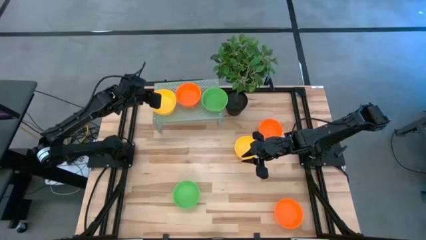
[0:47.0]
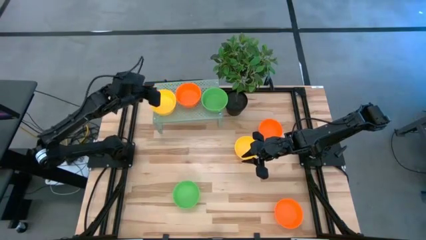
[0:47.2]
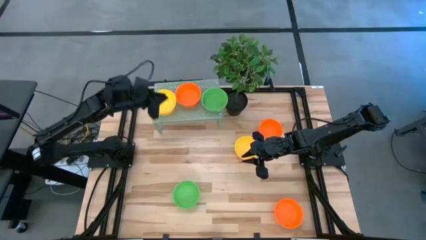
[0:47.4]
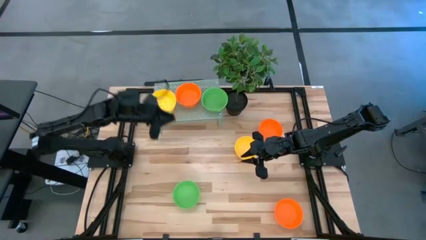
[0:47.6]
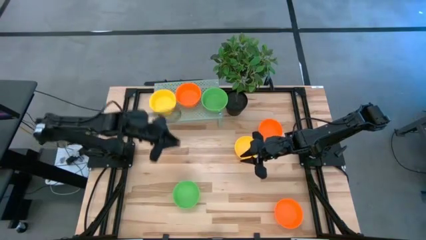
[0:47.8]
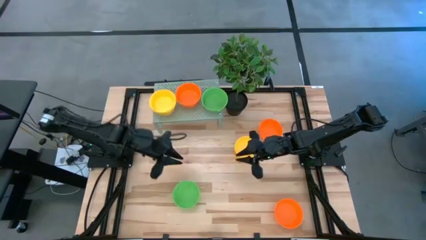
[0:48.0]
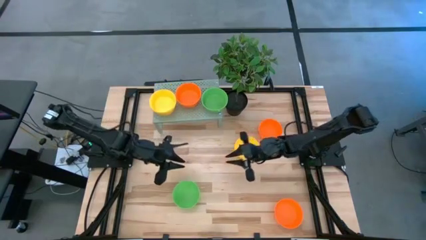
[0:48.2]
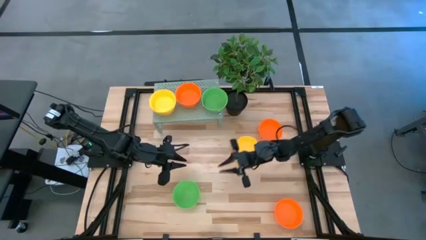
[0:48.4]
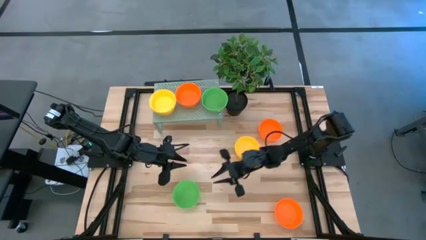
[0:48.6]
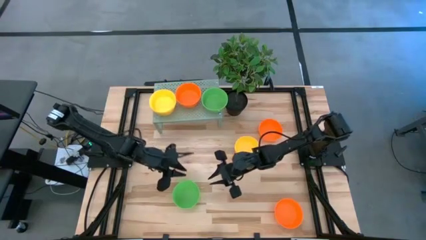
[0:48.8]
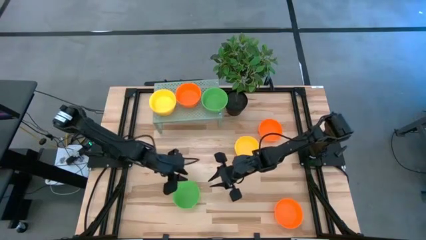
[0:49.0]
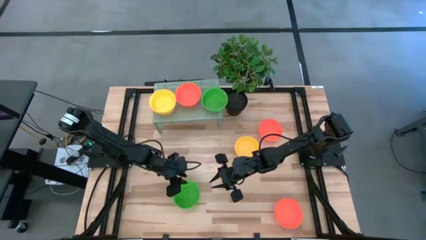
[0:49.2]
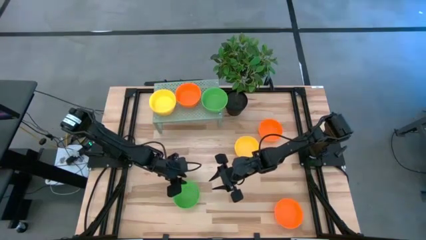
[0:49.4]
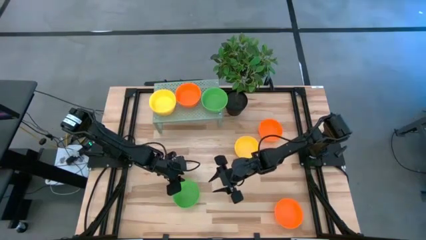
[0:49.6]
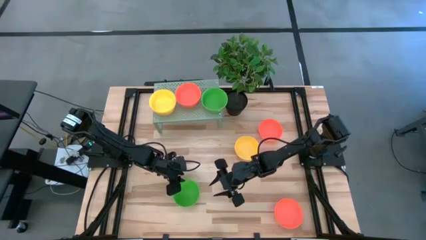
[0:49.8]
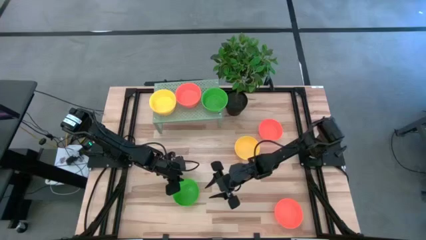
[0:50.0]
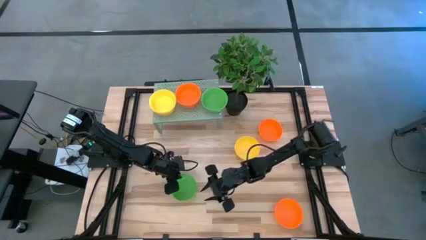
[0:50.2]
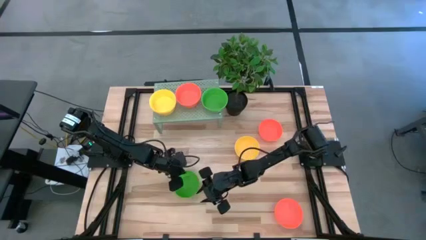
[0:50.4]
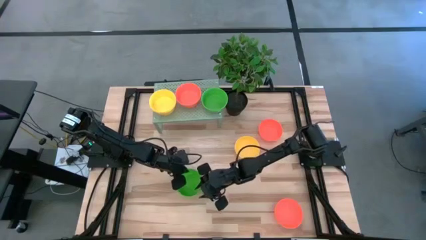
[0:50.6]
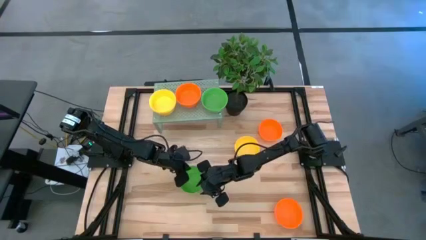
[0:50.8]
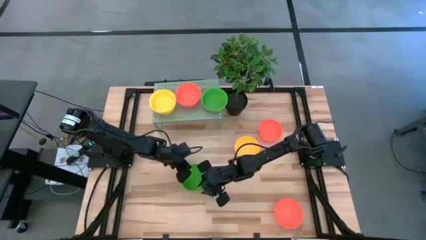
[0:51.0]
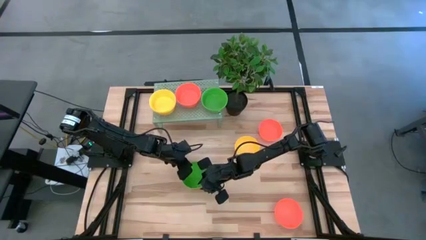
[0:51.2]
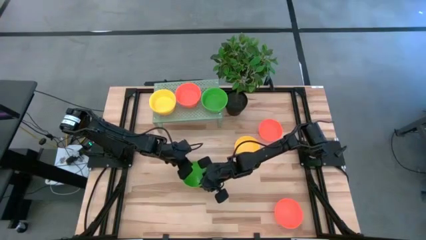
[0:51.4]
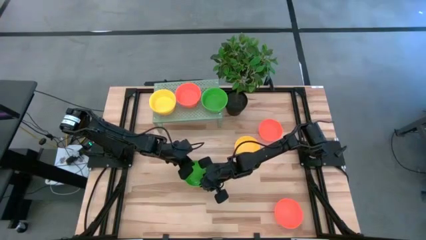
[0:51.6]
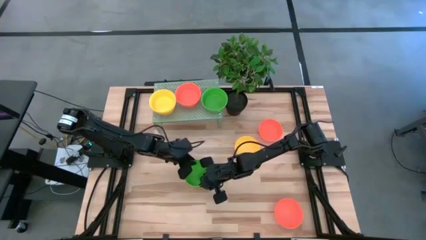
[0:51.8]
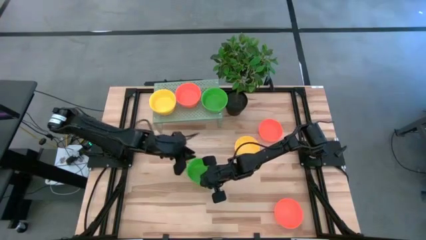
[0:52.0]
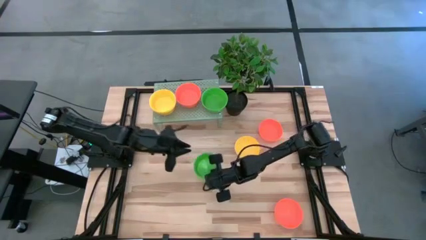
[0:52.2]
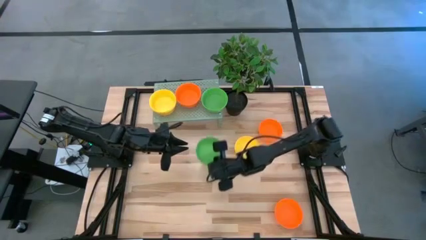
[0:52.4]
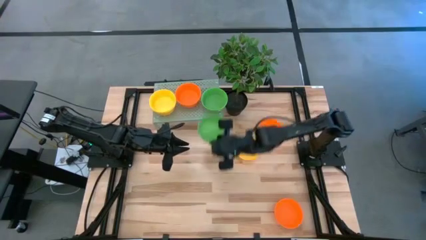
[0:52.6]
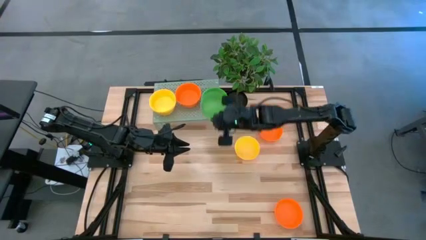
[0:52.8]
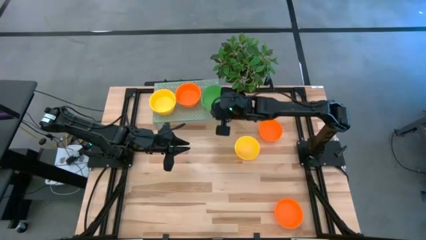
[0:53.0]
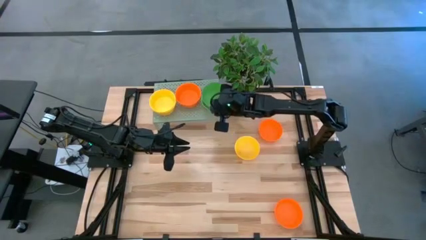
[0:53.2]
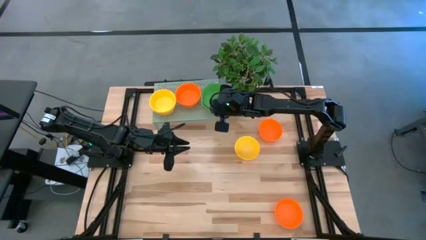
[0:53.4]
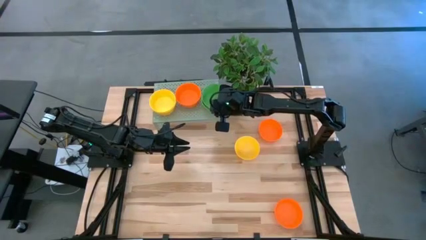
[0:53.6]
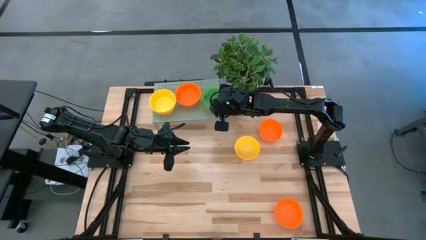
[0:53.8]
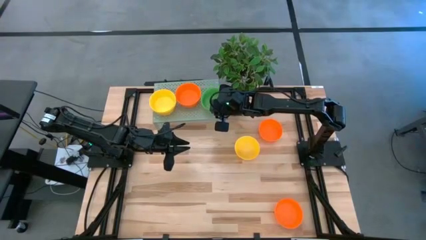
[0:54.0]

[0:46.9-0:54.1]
Task: Pick & Place Mini bowls
Stack the green bowl on top of the other green bowls on the shelf

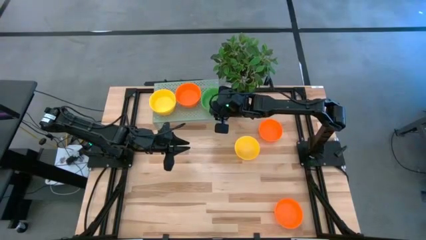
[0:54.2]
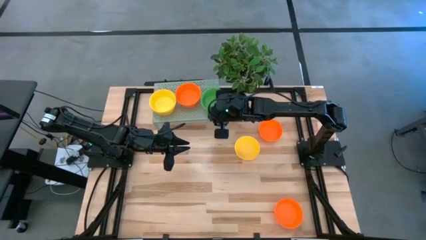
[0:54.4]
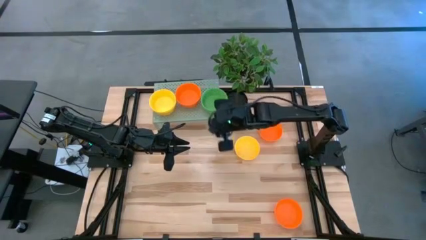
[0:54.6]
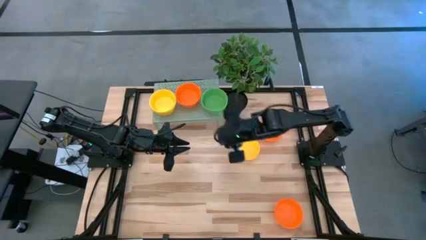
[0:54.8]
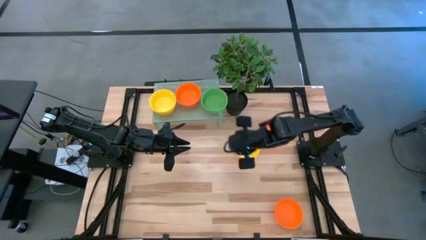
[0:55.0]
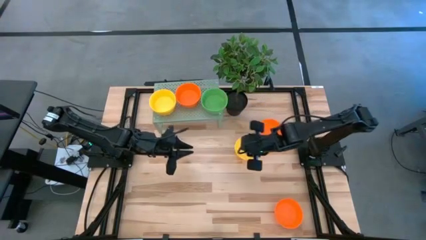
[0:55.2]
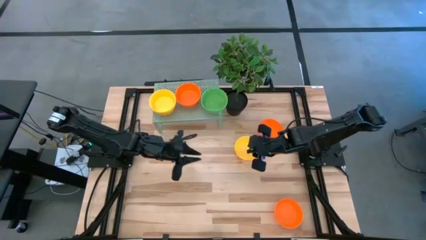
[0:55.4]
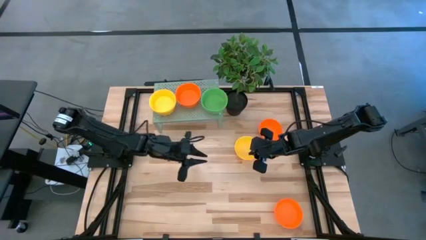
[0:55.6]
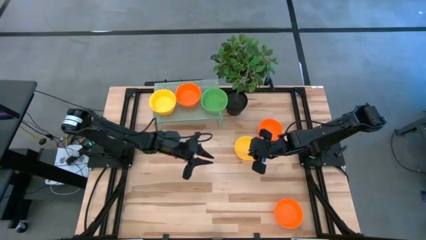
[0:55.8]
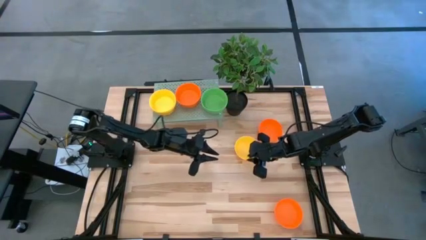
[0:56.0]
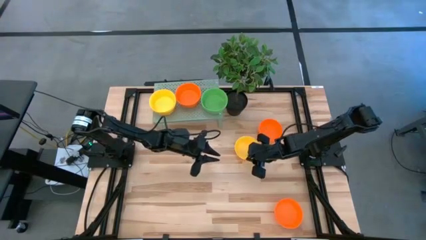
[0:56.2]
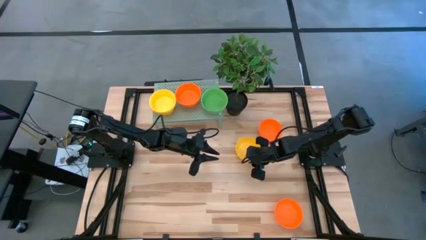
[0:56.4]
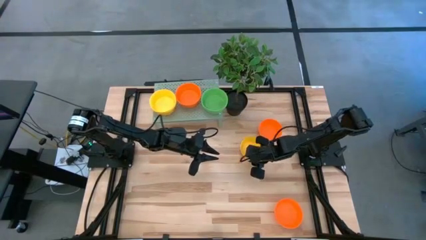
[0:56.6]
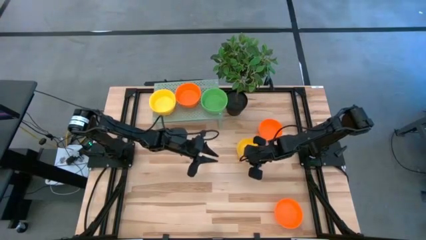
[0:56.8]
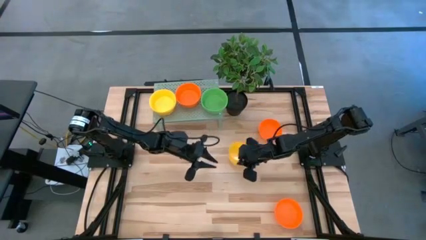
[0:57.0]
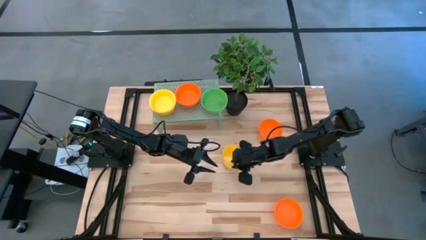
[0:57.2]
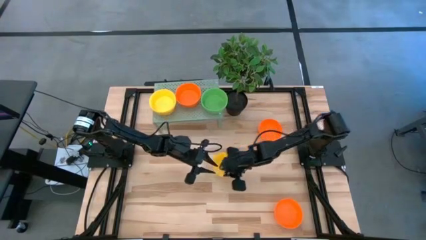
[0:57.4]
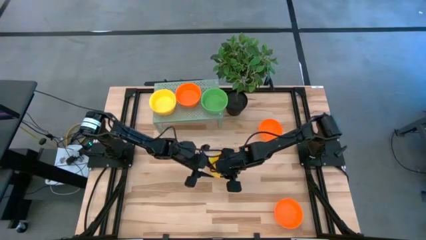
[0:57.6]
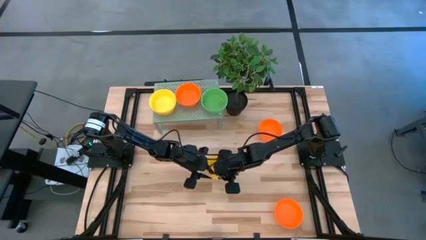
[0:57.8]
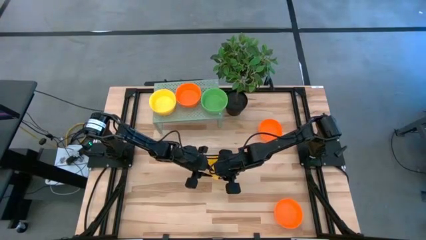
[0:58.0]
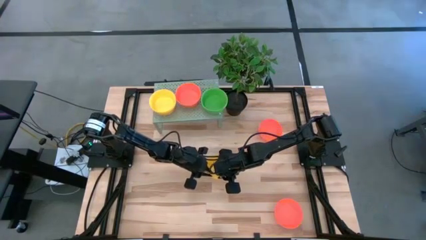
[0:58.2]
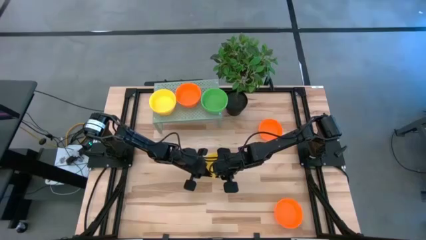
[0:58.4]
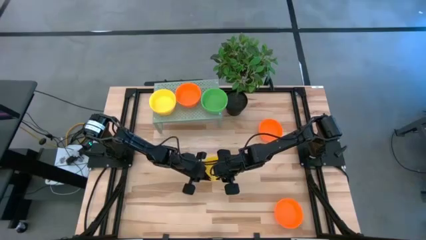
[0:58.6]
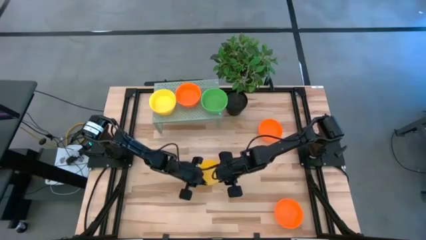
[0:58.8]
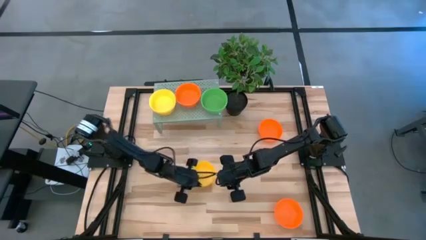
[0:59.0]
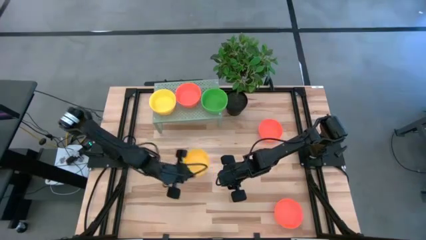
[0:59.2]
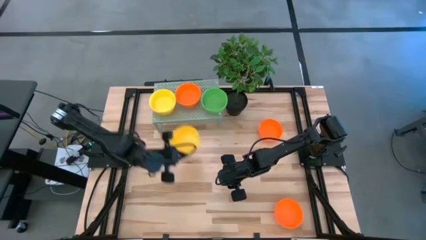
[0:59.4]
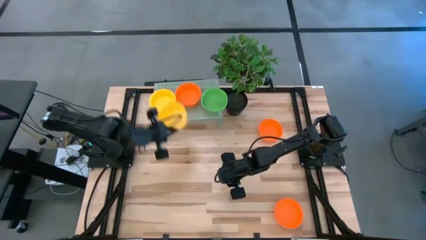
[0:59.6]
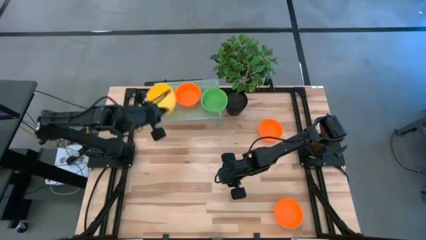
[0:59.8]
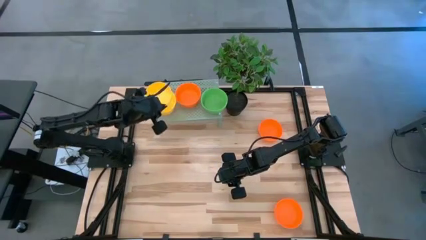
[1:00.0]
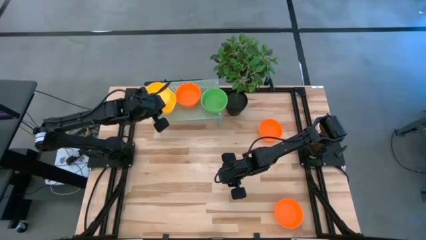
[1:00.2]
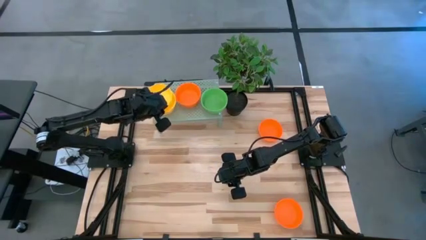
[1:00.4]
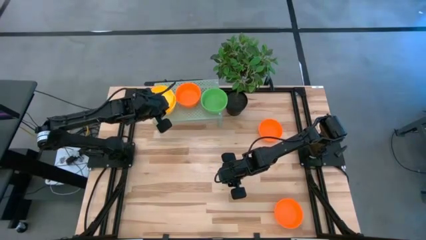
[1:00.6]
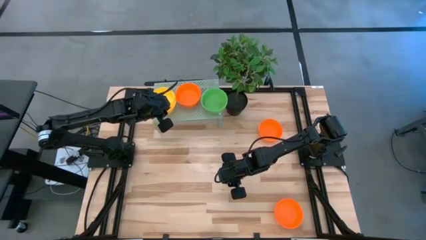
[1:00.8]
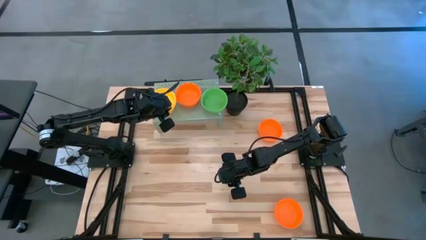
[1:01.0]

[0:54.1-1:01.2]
Stack the yellow bowl on top of the other yellow bowls on the shelf

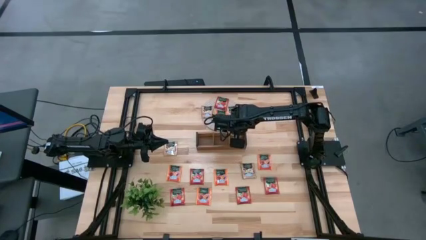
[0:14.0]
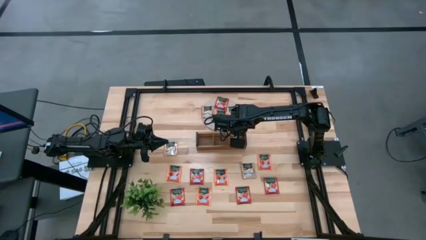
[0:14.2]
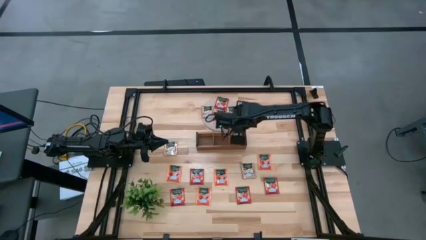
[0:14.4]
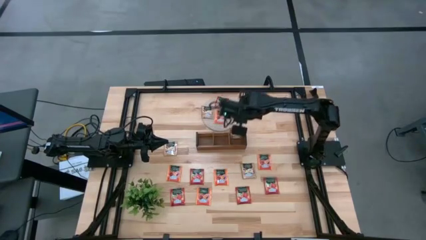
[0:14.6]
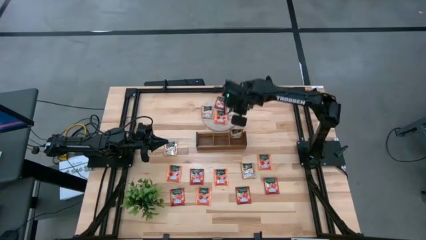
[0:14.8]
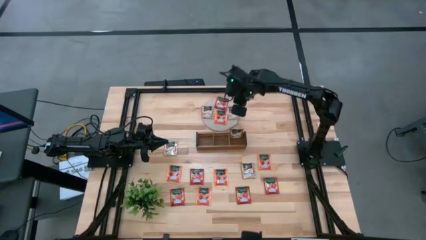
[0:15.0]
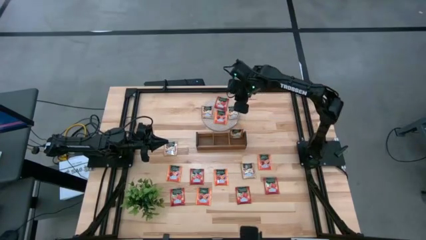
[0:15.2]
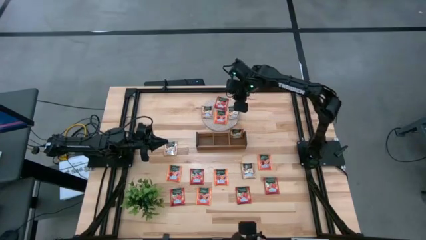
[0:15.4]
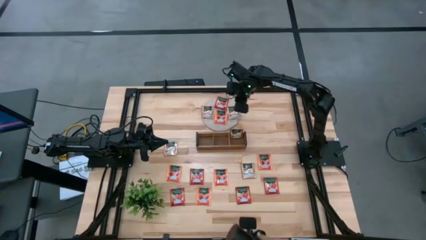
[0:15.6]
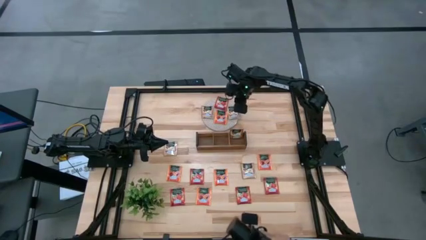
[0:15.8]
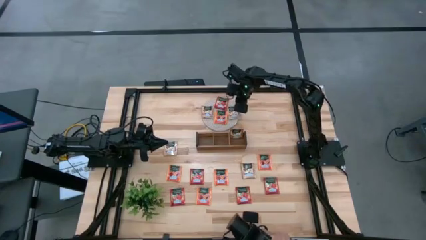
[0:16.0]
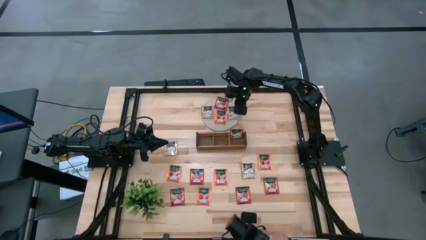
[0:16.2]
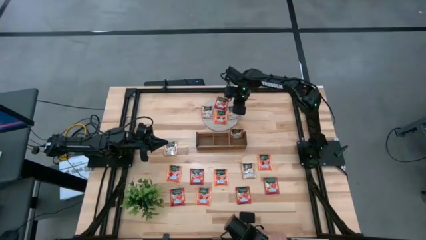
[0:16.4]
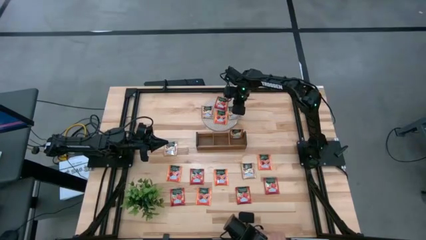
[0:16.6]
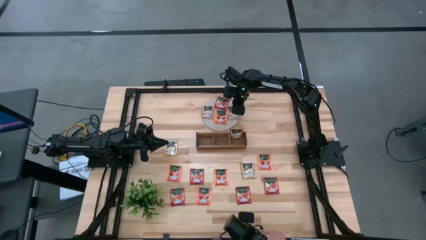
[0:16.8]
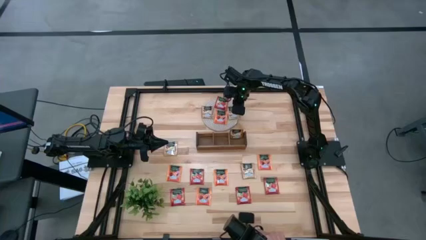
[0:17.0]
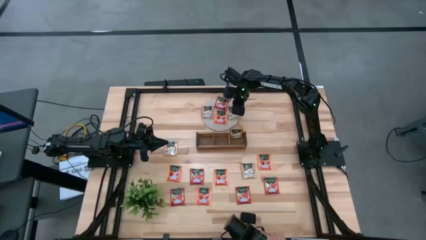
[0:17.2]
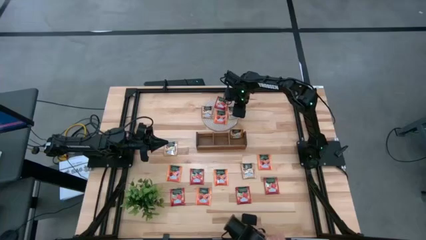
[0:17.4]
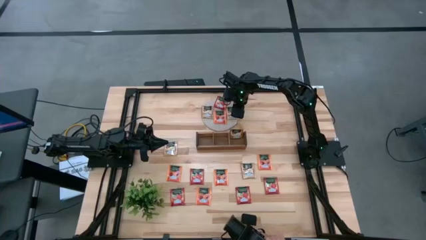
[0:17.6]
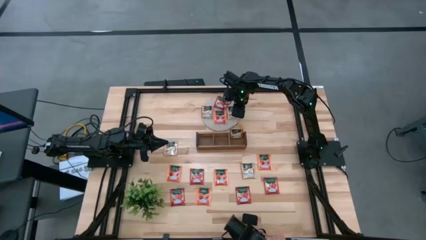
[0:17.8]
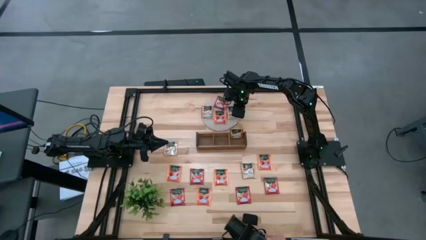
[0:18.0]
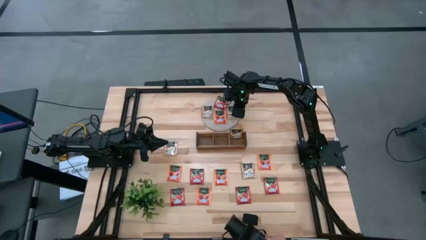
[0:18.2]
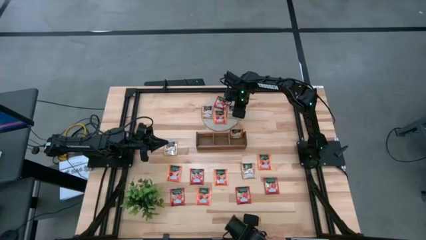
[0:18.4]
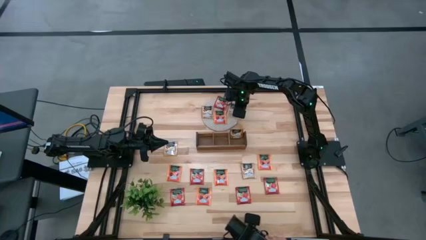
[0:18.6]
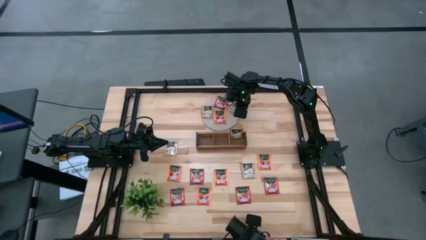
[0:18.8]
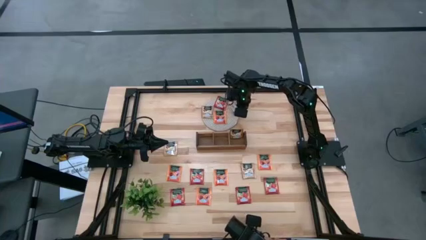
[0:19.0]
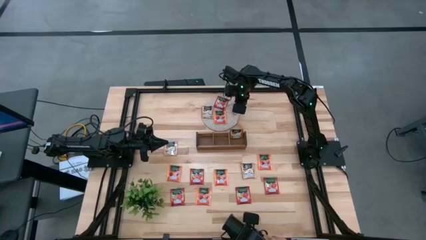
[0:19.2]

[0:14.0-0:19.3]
Task: Pick & Place Tea
Put the brown tea bag into the right section of the wooden organizer
